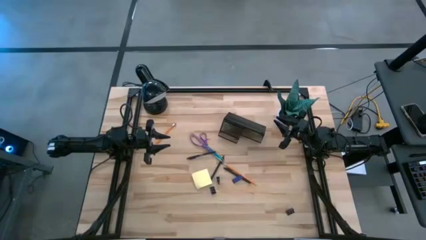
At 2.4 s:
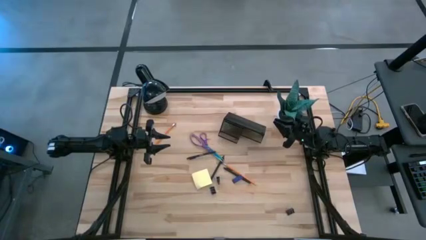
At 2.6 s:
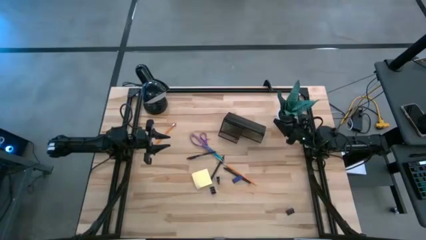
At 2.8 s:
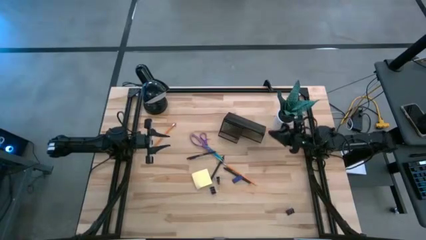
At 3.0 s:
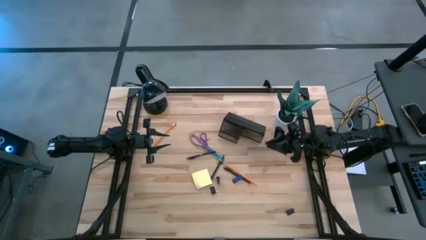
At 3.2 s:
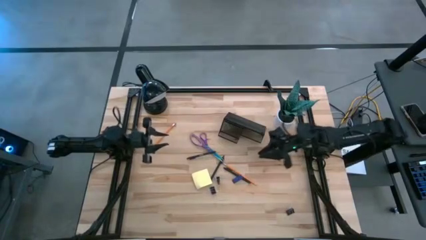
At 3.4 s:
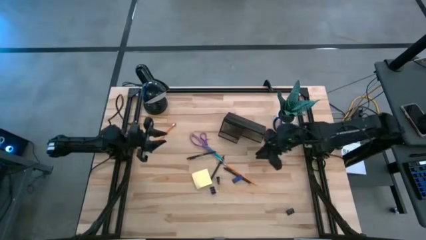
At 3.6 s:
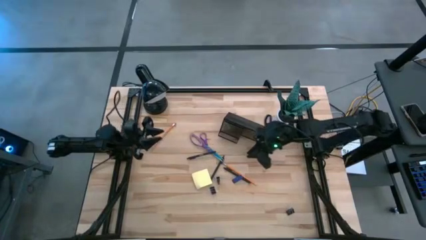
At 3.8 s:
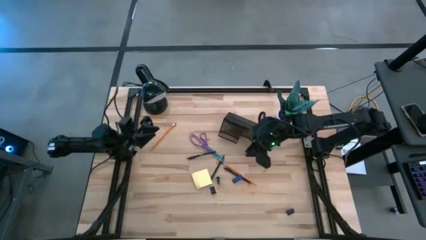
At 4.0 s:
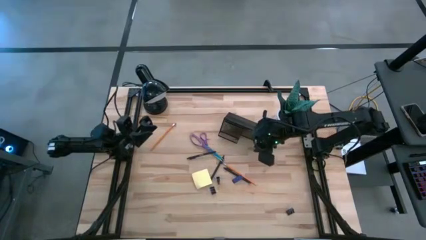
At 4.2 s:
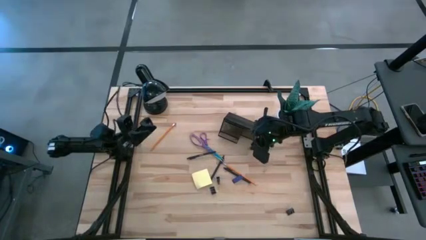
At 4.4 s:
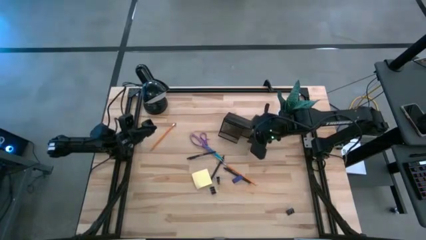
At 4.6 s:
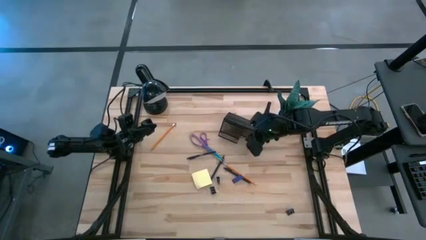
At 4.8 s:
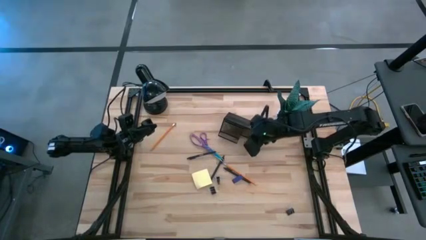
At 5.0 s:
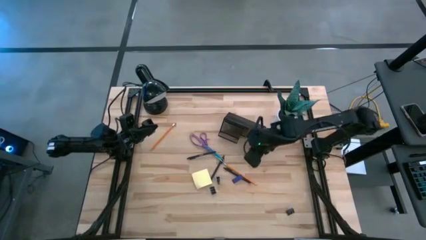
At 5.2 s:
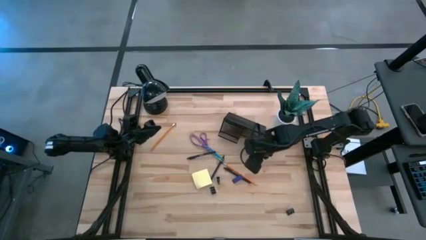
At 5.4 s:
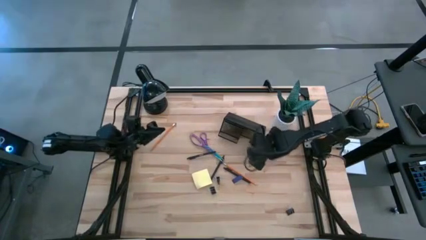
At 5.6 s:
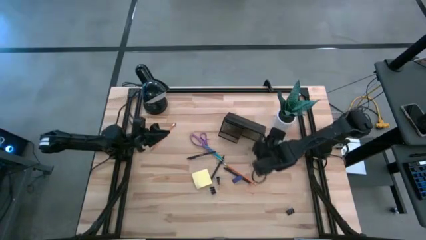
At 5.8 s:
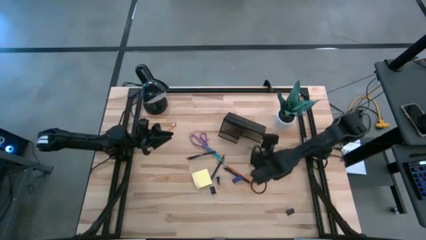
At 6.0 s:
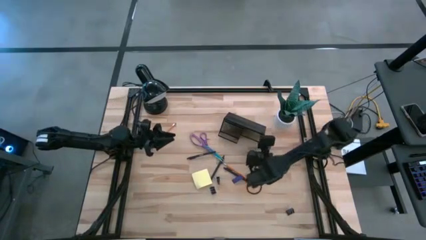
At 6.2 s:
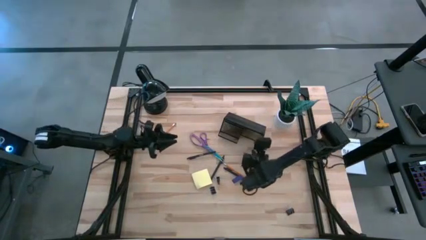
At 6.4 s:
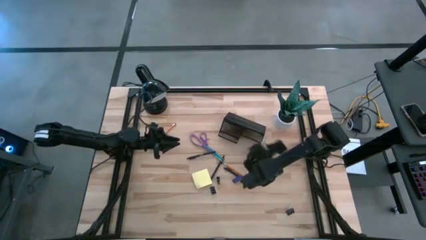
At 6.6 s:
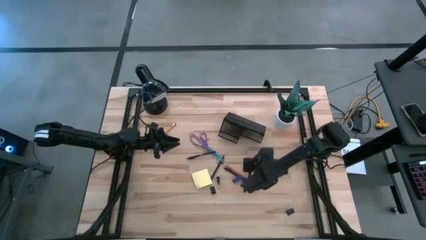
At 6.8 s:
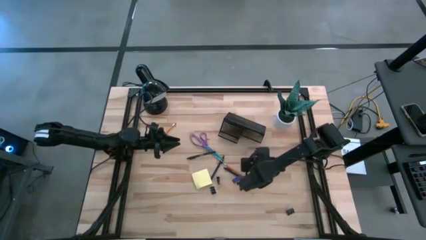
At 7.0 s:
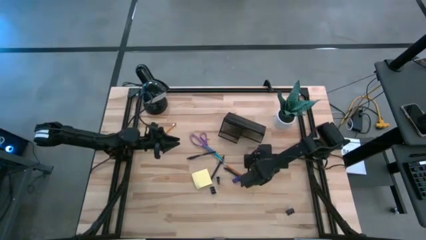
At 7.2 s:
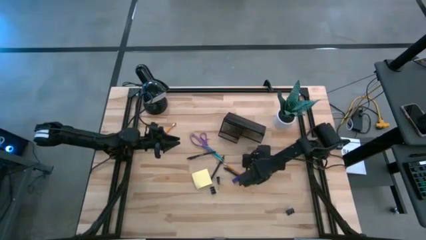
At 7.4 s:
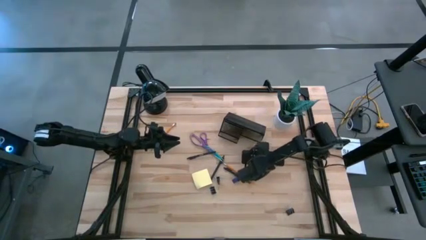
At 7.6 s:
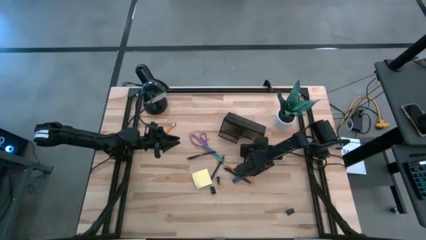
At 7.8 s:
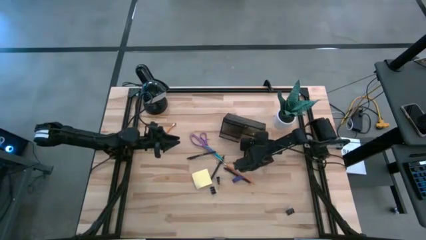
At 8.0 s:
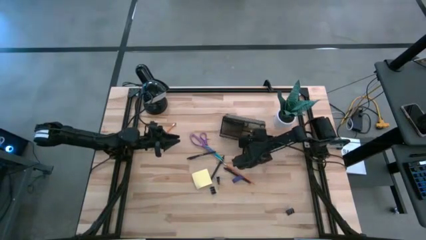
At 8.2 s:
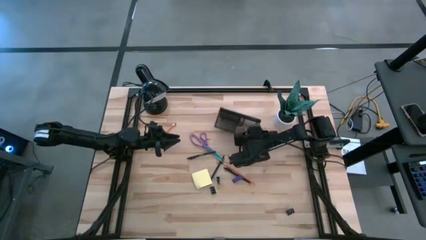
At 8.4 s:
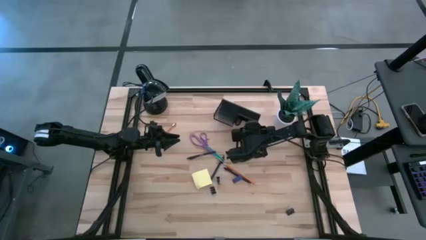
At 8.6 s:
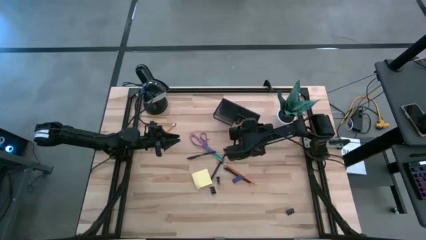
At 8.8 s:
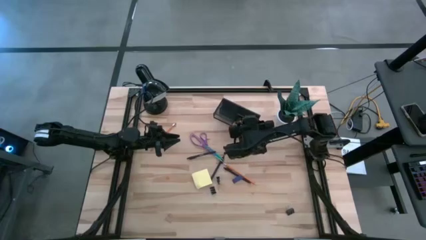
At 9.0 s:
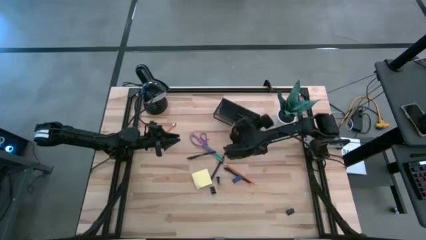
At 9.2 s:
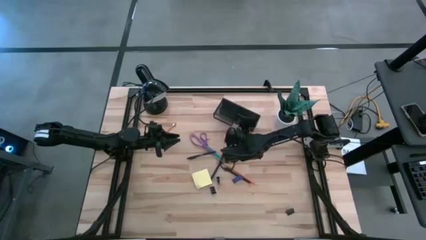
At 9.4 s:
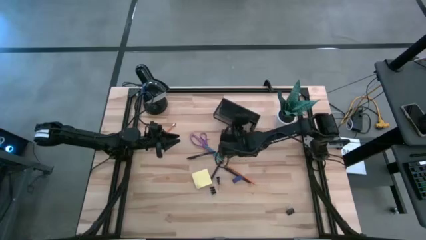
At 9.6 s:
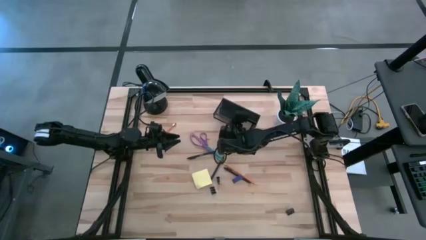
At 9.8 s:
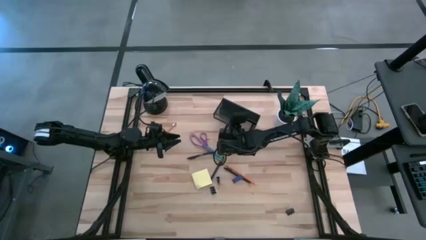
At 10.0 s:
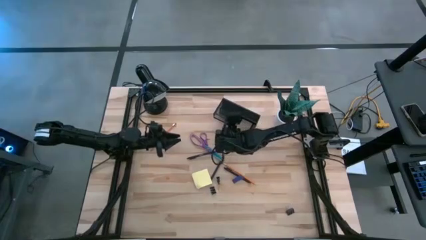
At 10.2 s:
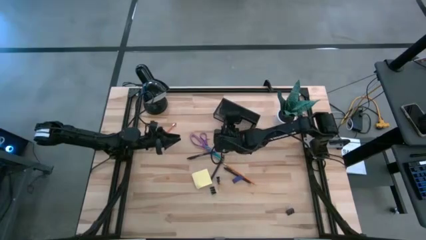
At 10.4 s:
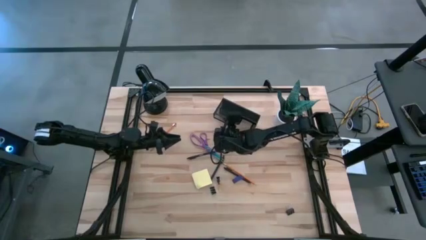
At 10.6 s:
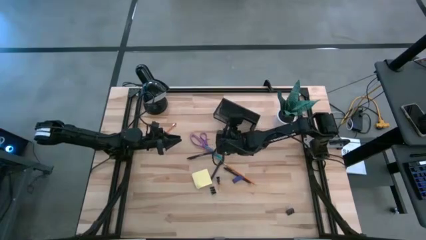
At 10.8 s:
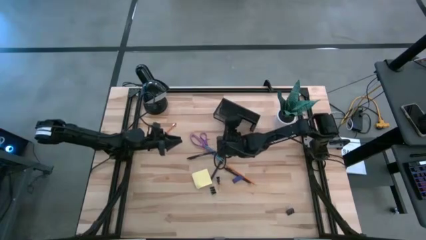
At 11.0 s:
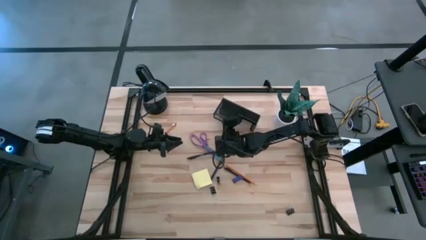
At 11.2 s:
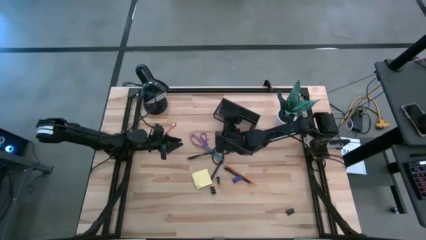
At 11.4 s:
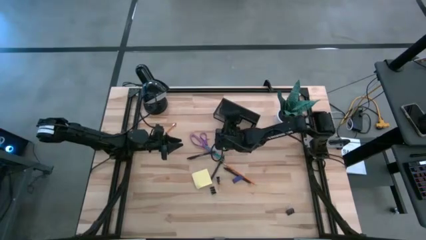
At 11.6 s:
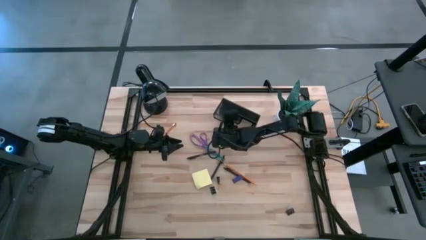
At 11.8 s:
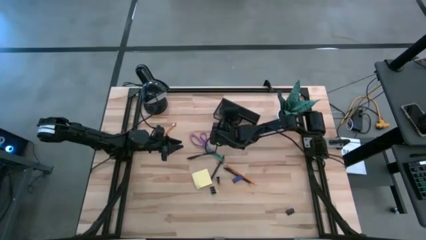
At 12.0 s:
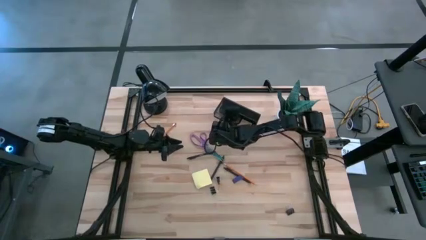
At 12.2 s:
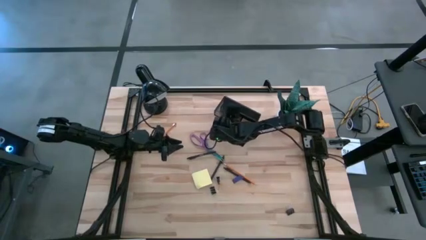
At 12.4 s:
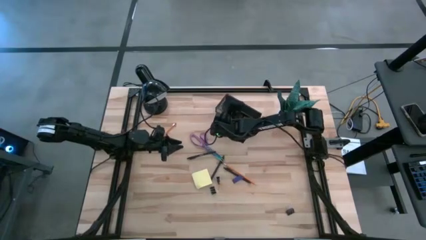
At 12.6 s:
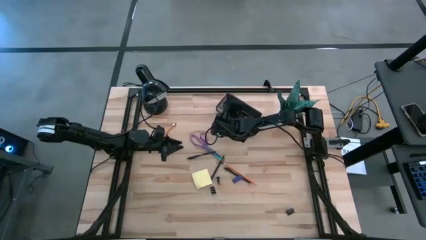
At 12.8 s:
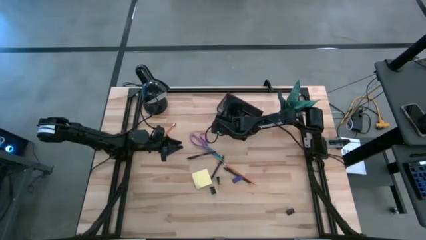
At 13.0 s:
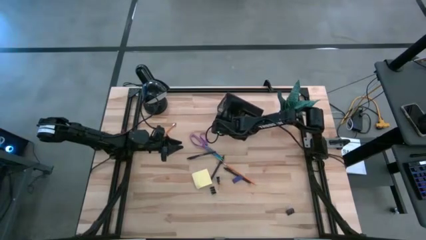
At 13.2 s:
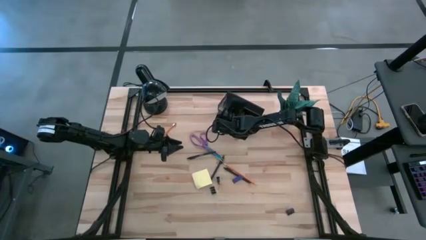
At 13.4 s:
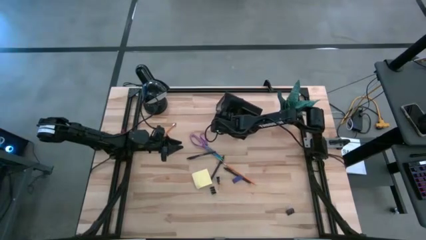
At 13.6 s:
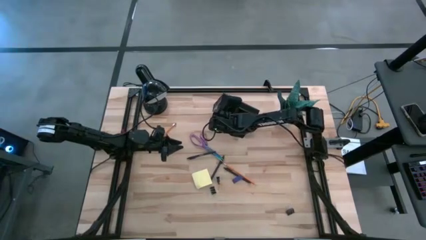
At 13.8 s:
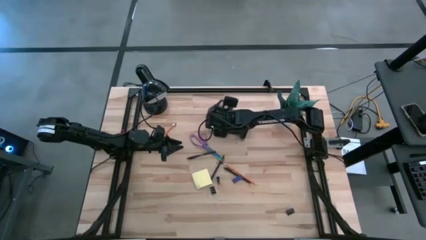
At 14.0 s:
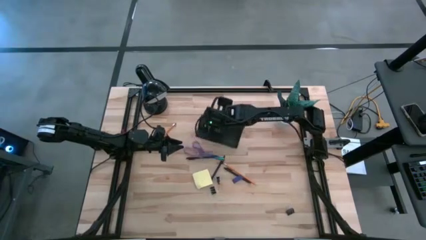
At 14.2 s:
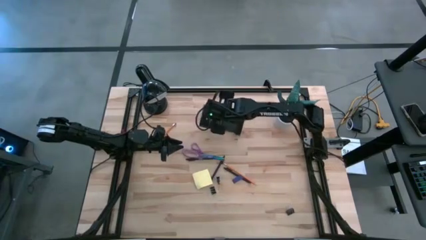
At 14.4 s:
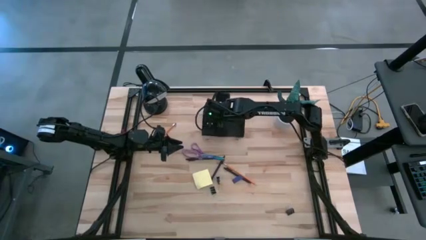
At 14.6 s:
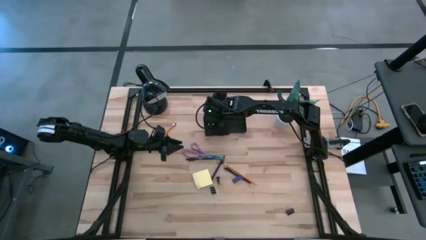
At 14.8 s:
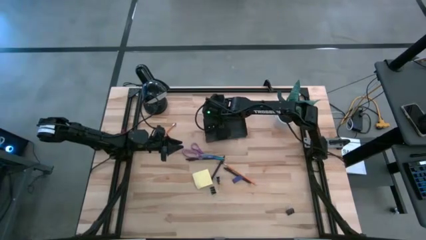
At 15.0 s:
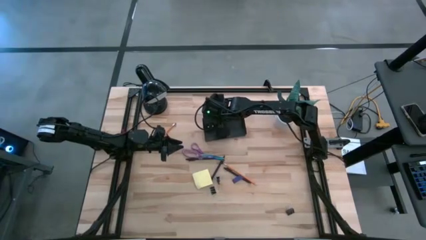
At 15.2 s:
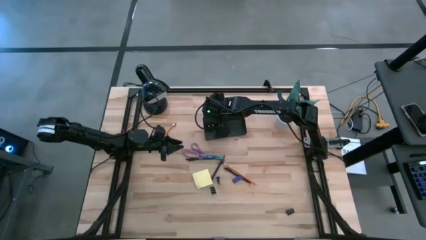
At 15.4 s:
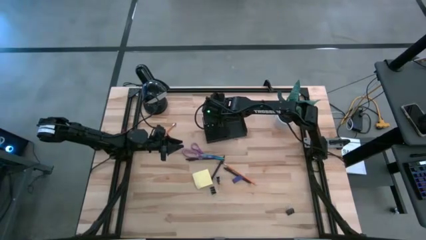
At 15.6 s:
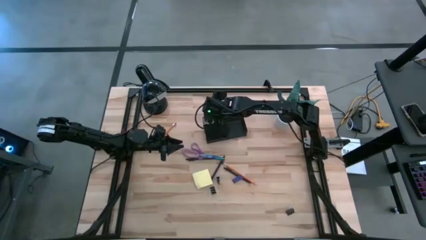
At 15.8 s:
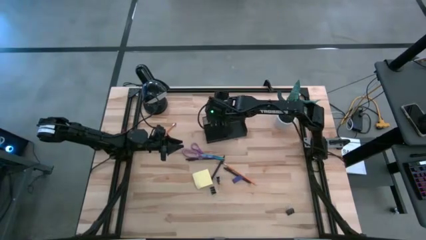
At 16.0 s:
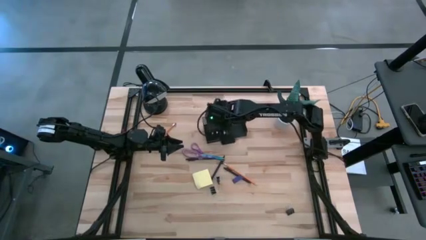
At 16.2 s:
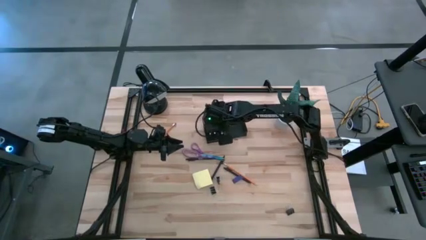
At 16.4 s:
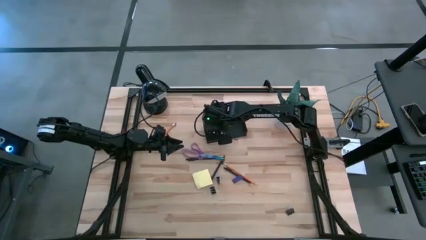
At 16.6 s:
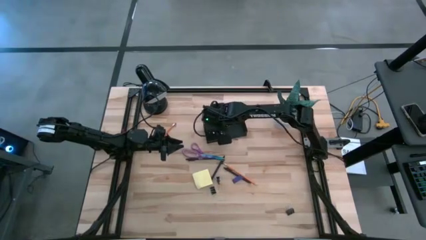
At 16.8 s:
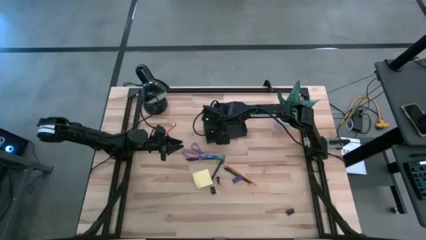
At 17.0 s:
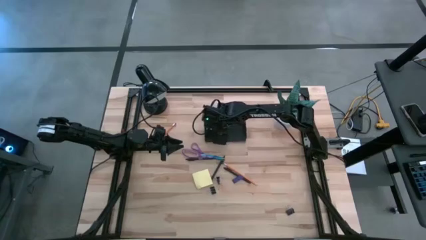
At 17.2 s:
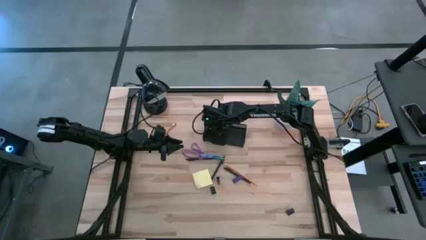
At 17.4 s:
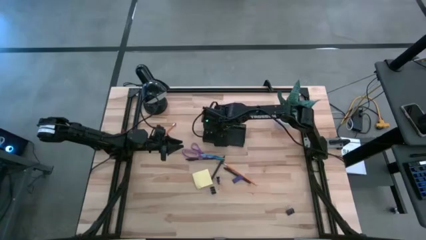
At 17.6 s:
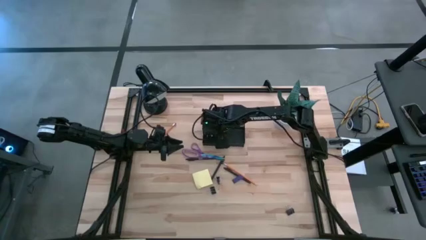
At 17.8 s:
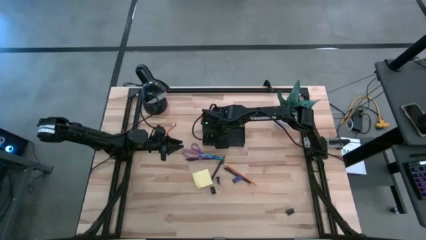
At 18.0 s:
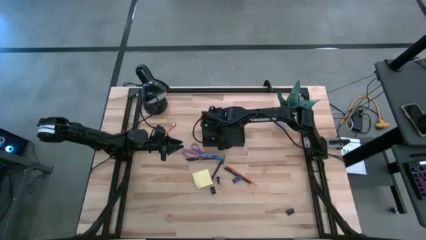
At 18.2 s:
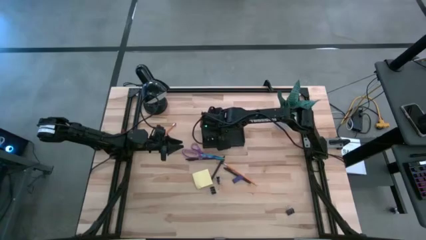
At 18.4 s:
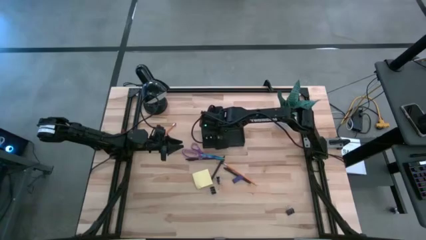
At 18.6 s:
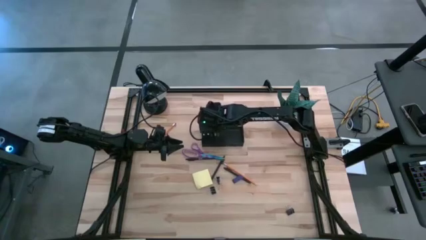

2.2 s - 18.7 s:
Task: Pick and place office supplies into organizer
Prepare the black desk organizer
